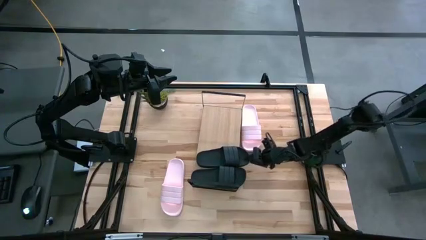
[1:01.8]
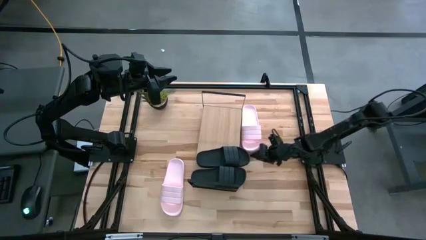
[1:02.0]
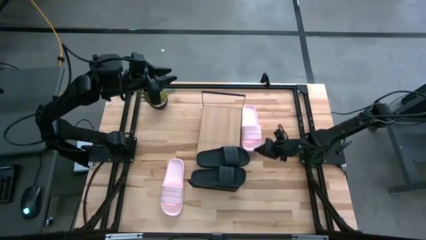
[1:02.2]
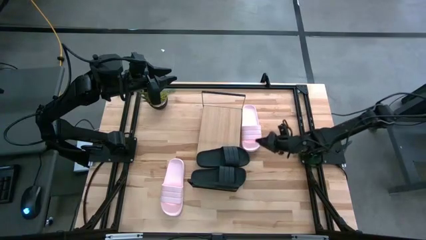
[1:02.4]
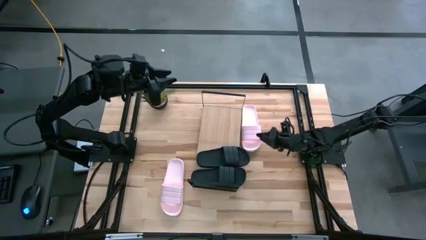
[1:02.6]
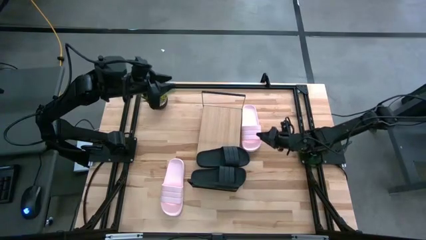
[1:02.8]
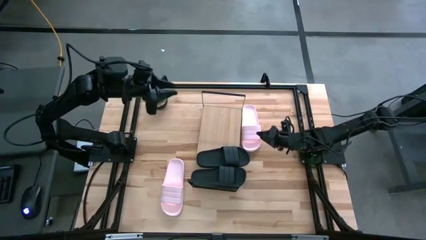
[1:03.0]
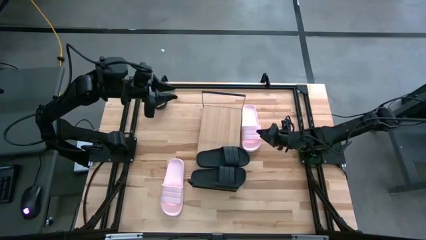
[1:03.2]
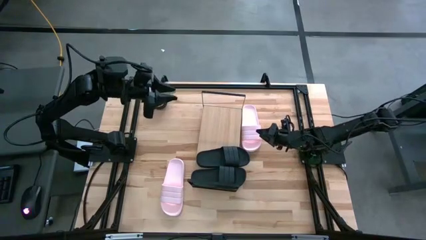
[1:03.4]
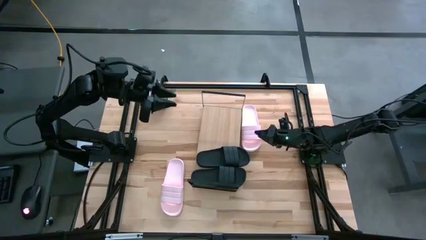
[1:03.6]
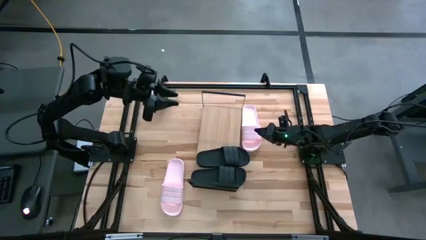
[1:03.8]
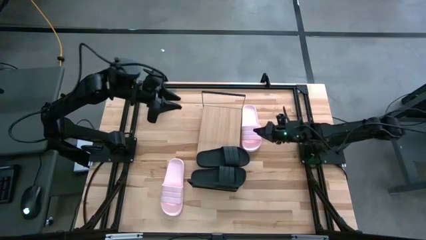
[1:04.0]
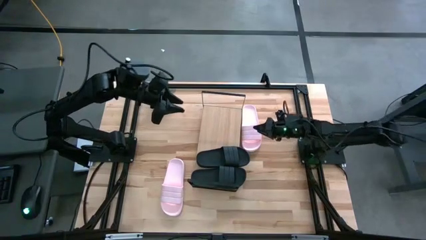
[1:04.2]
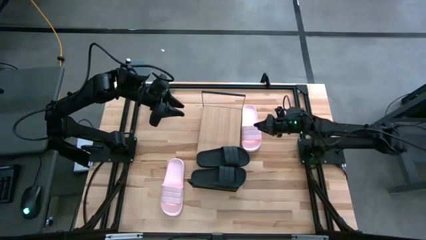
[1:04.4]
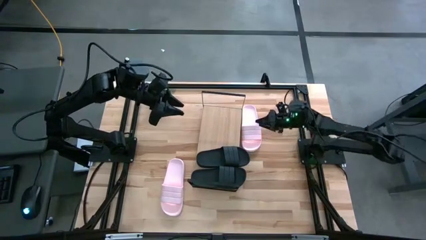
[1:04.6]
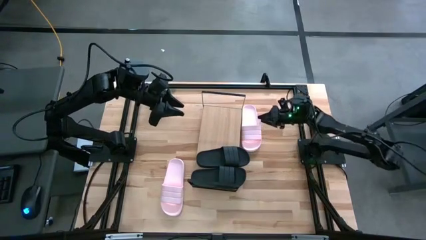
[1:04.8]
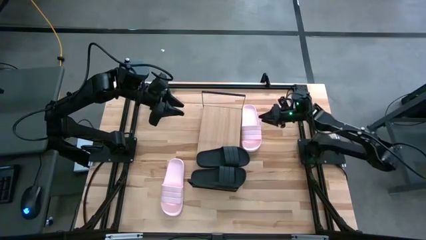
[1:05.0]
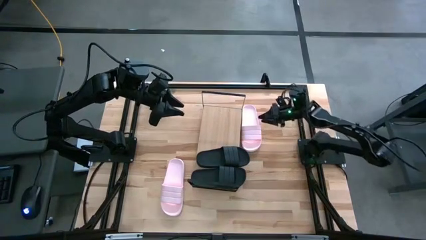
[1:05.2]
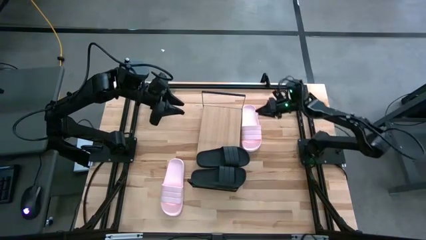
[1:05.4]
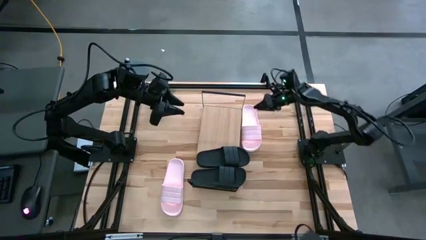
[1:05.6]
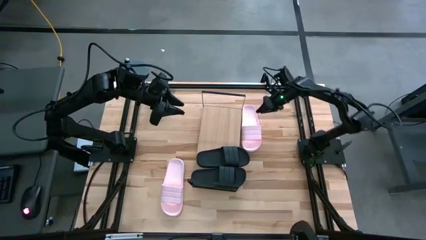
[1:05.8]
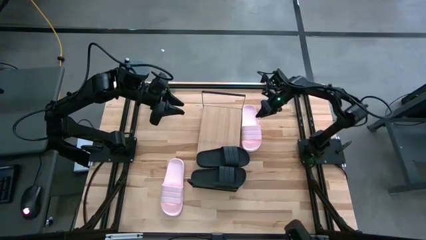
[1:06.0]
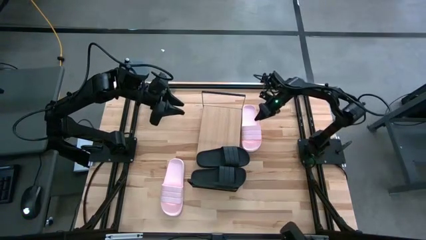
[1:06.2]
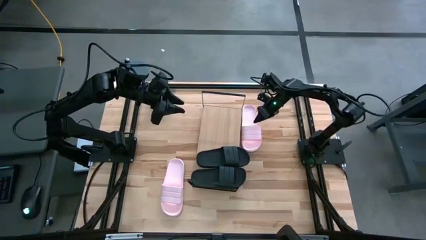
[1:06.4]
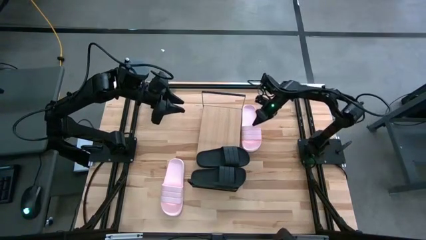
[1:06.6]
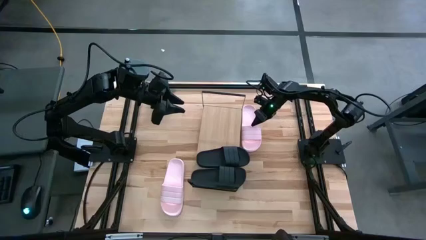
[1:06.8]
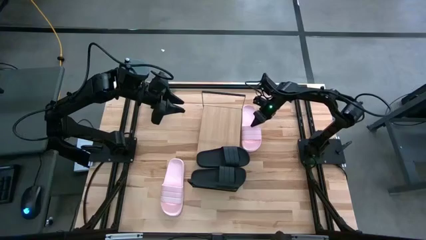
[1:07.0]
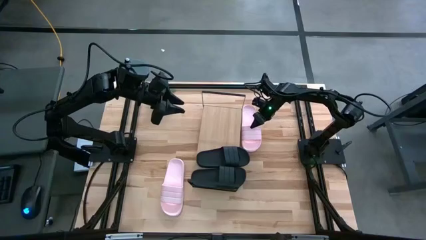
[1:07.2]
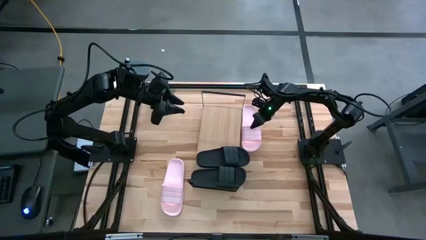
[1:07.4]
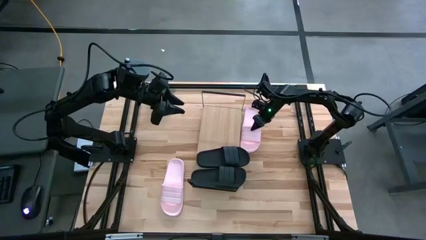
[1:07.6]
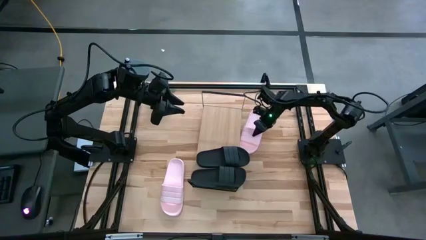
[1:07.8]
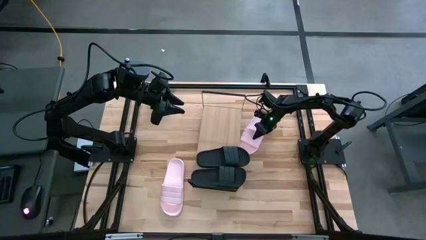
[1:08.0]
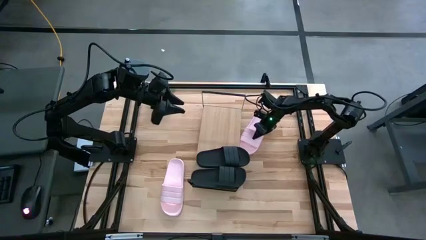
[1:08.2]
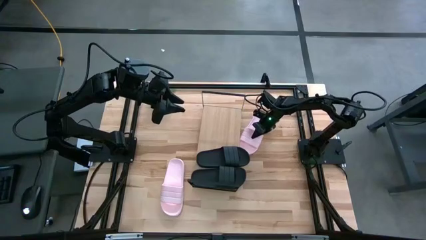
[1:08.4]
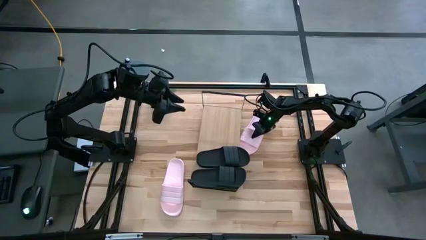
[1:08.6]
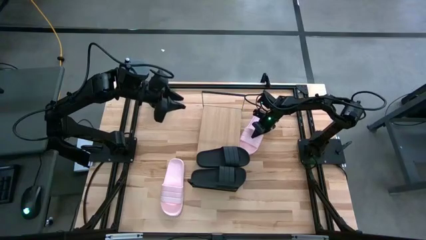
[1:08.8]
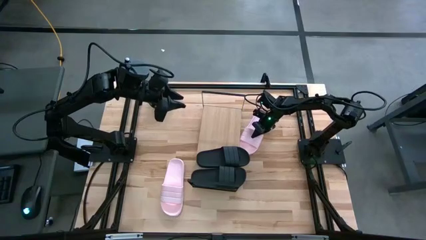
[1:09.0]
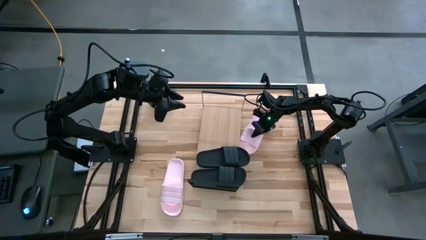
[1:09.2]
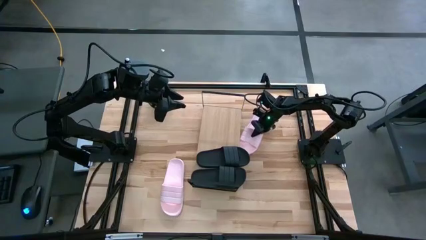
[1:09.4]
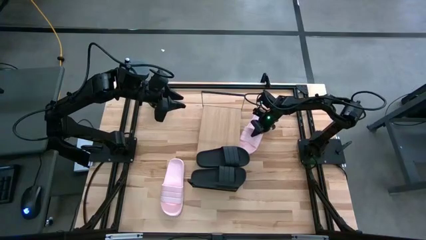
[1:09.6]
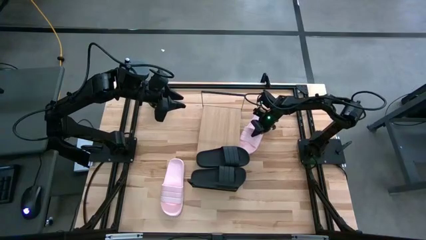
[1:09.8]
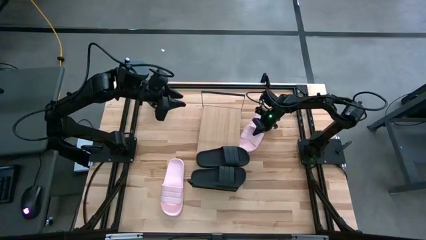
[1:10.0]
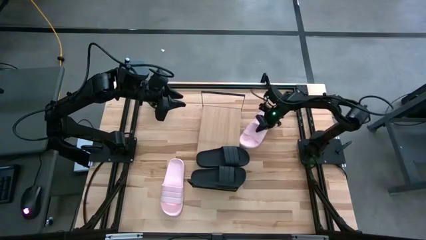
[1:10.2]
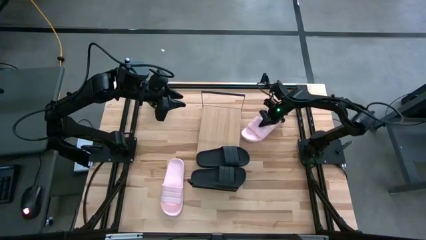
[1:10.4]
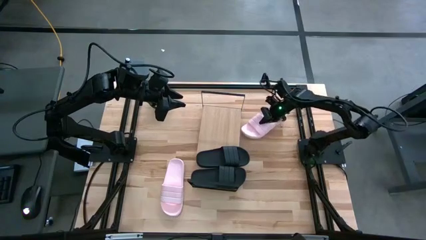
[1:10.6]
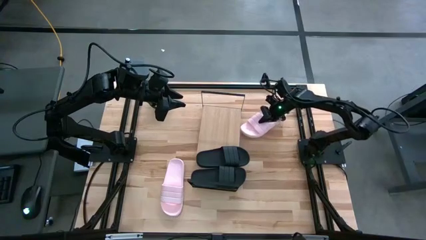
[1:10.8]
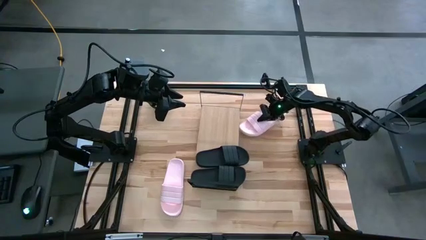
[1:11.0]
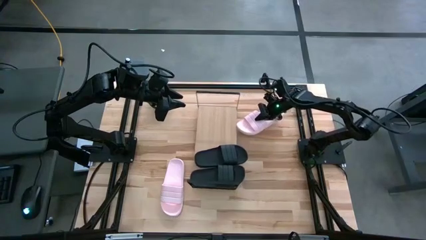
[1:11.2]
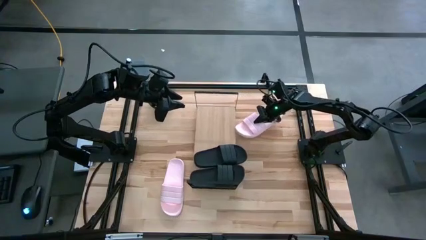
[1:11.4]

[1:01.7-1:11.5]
Task: Pick and place slides into the shelf
Put the top pink slide on the shelf

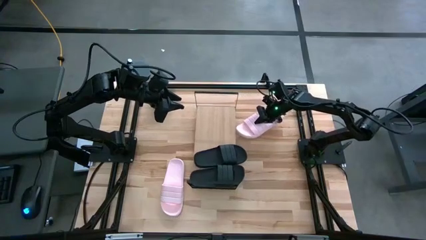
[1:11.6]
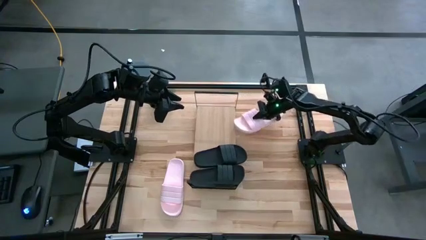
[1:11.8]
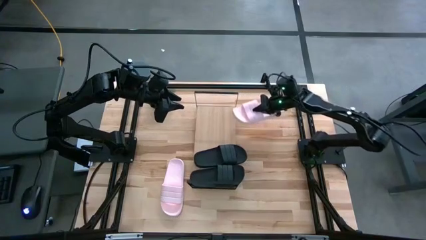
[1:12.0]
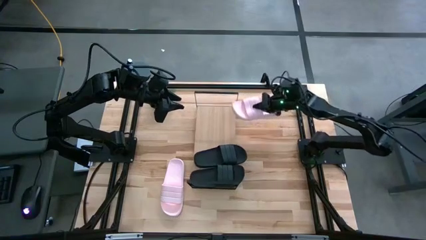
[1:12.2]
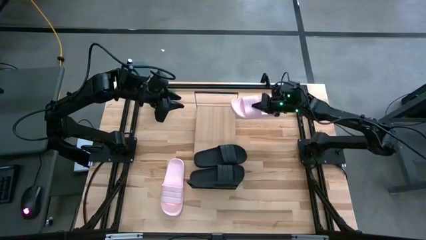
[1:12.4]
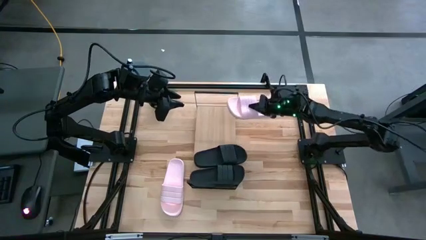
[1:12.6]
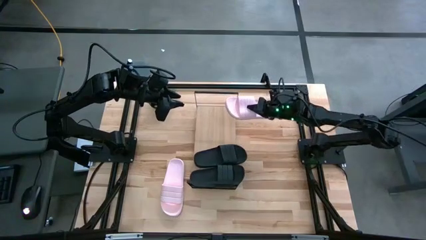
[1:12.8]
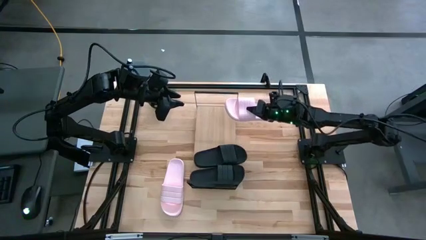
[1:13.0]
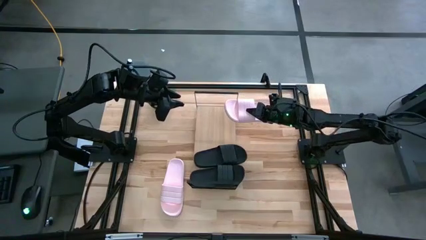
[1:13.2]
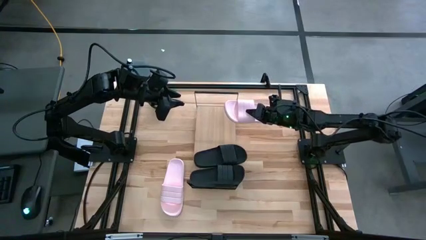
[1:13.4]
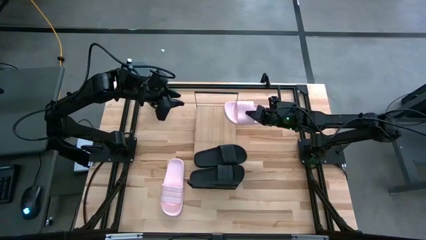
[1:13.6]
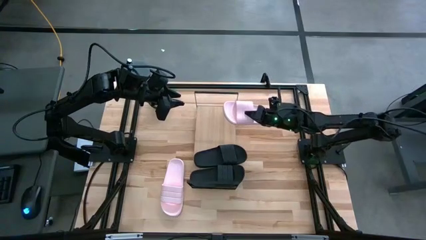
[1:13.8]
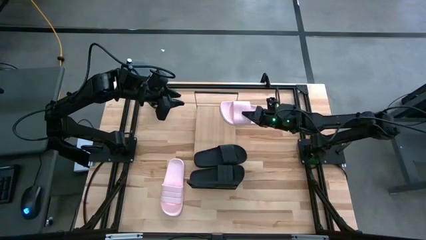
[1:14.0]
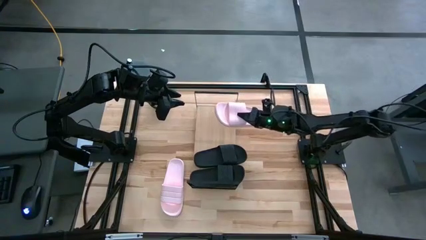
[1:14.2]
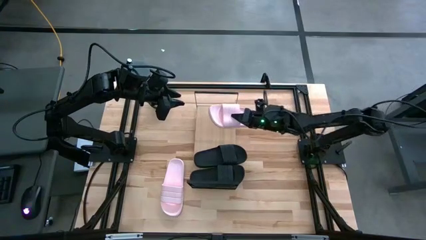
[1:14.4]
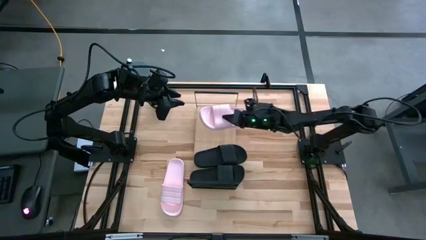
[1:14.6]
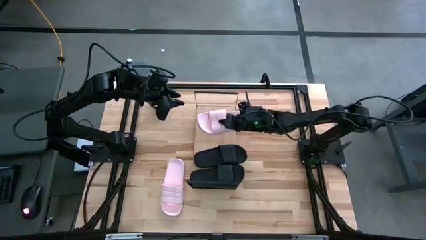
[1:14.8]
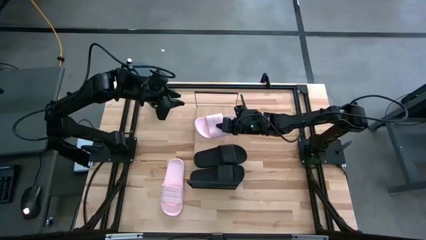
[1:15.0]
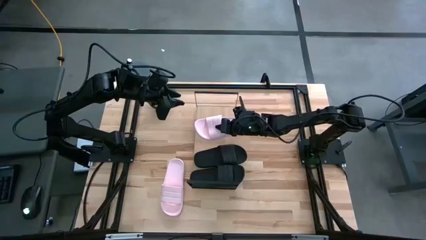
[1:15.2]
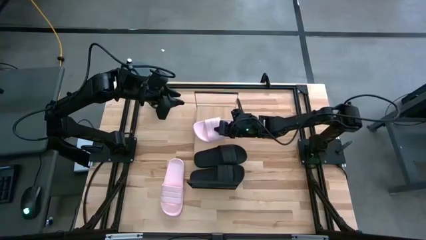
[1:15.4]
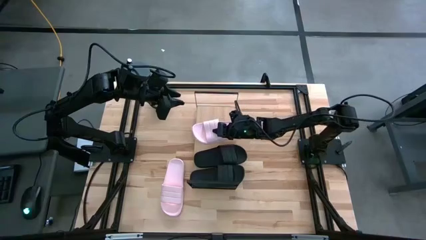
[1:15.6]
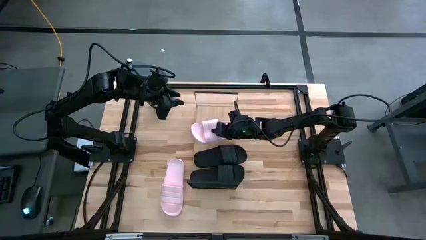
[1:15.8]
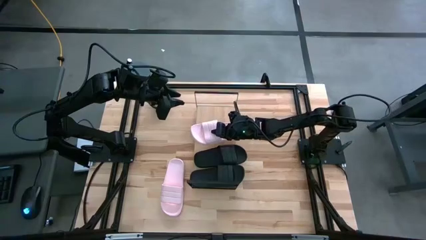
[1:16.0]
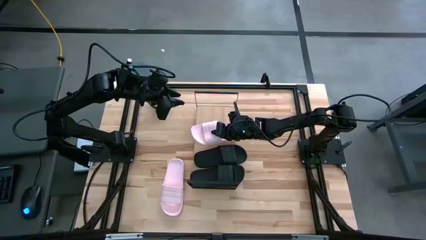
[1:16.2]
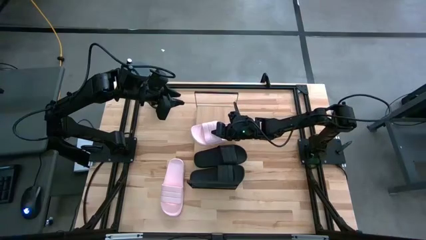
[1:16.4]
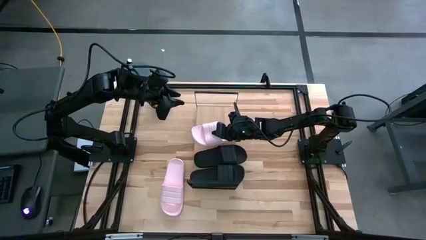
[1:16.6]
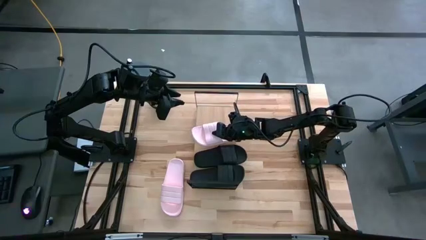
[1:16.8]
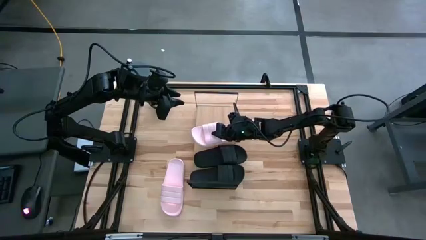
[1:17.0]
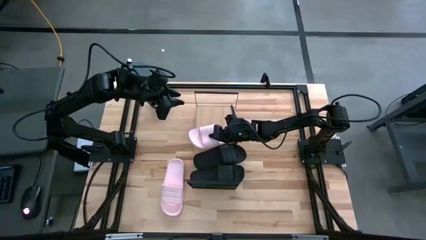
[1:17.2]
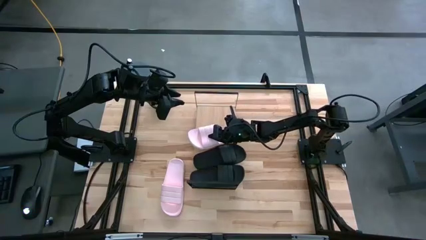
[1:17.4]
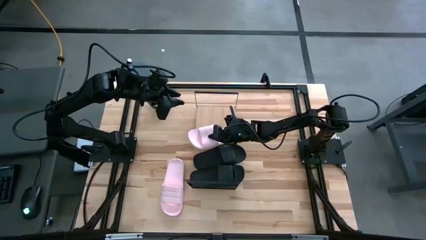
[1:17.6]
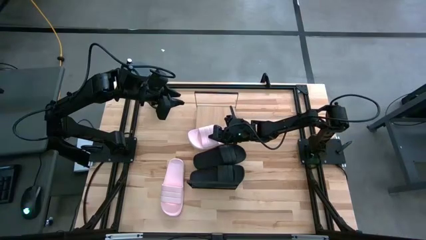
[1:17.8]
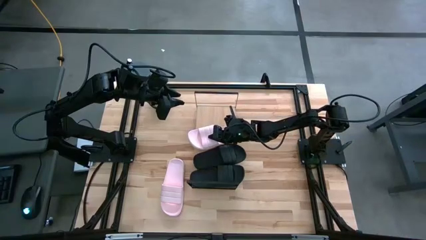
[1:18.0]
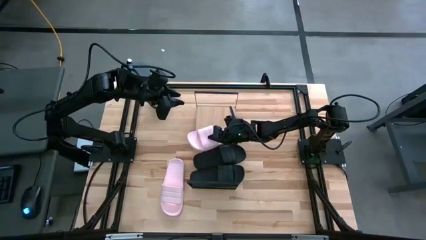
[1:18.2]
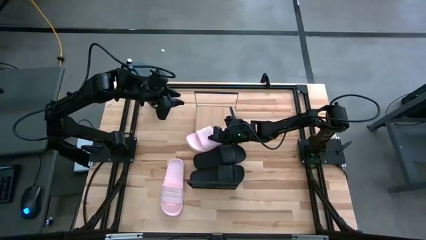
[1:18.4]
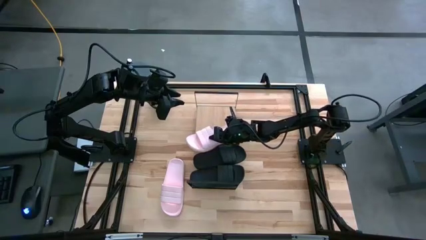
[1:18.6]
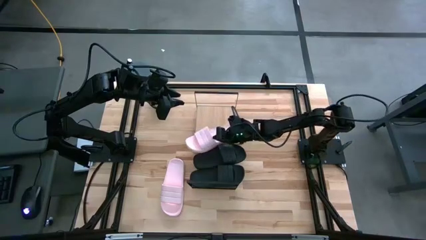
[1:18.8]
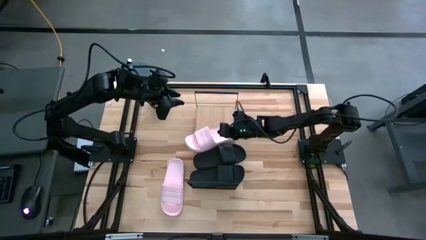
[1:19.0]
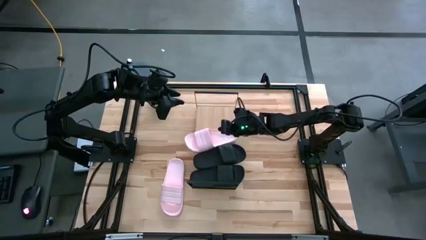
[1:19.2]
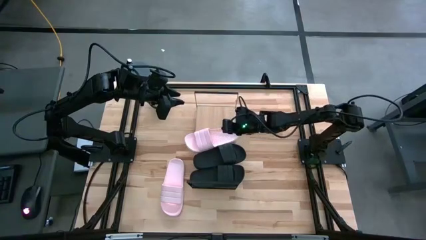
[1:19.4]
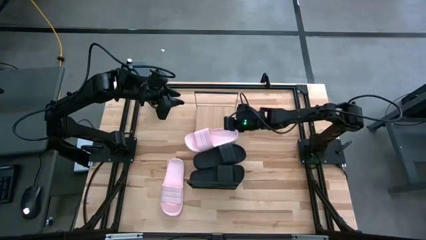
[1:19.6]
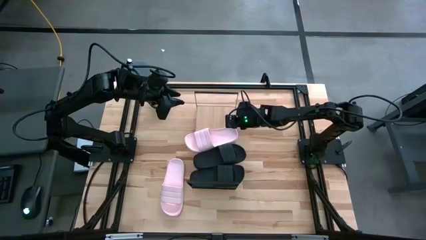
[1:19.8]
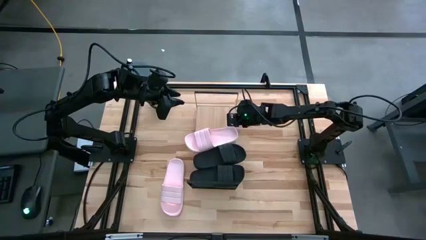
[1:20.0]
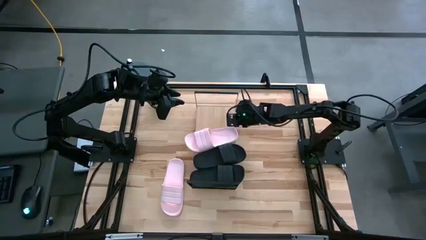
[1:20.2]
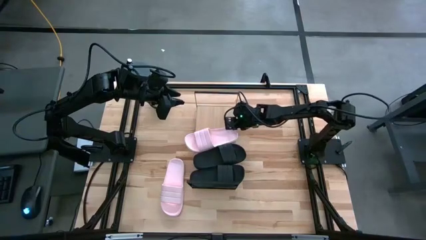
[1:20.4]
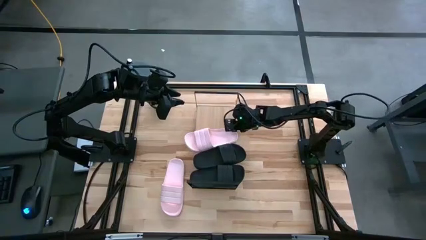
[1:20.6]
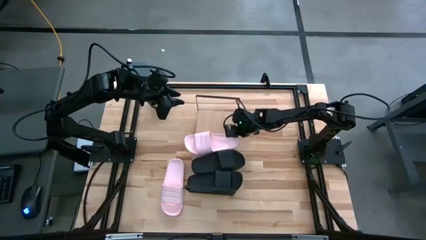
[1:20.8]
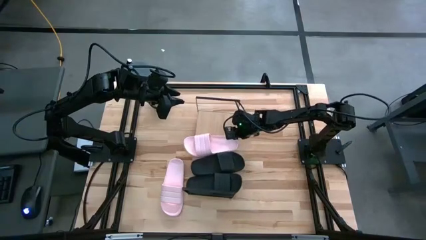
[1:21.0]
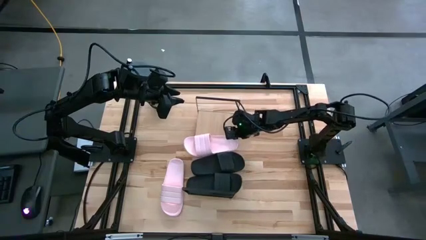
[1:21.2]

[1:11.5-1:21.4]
Put the top pink slide on the shelf
